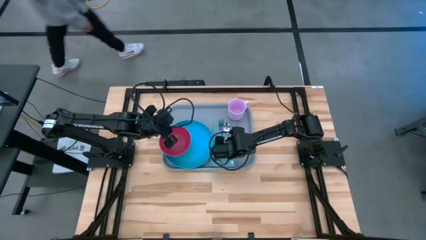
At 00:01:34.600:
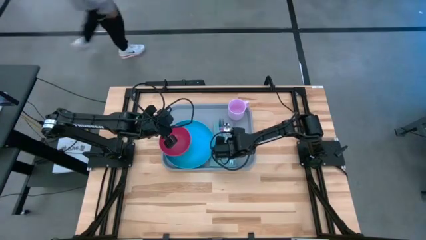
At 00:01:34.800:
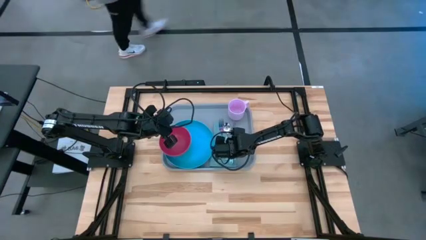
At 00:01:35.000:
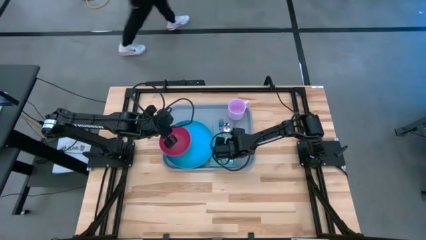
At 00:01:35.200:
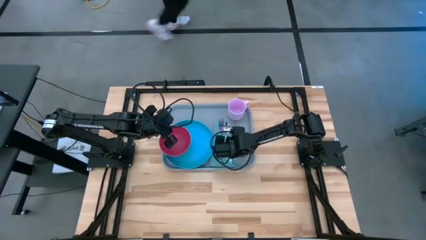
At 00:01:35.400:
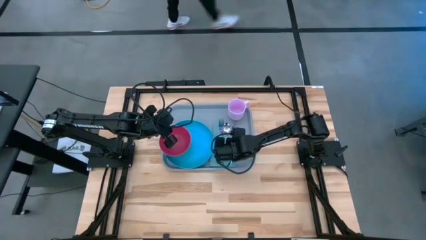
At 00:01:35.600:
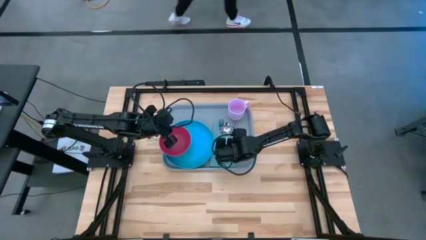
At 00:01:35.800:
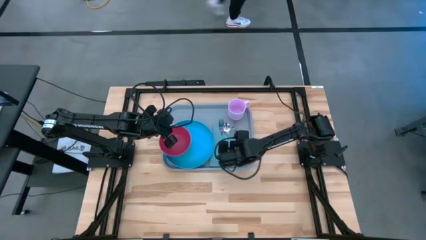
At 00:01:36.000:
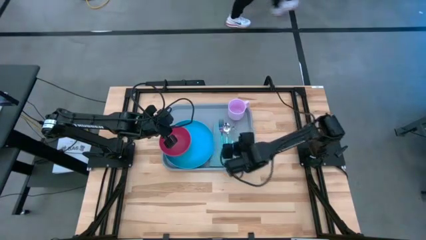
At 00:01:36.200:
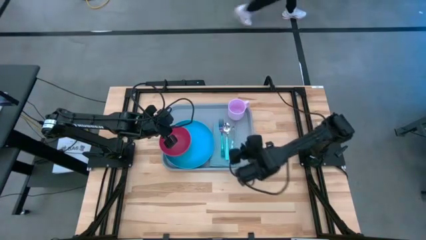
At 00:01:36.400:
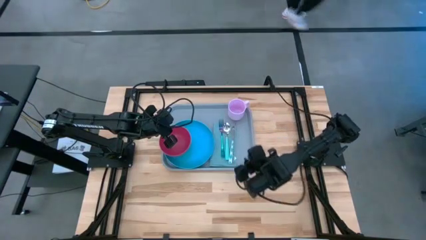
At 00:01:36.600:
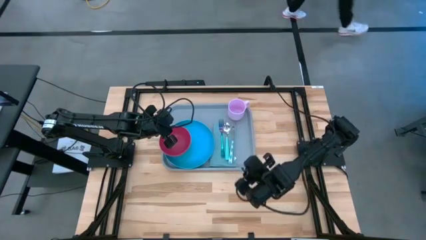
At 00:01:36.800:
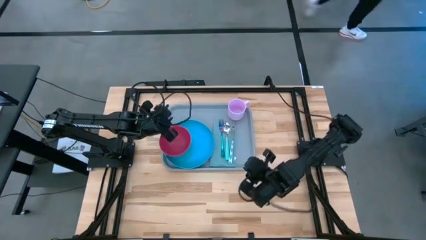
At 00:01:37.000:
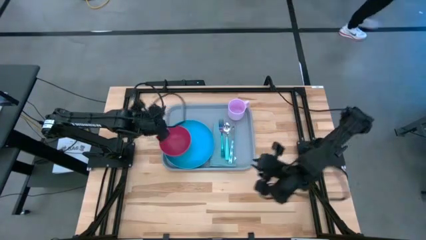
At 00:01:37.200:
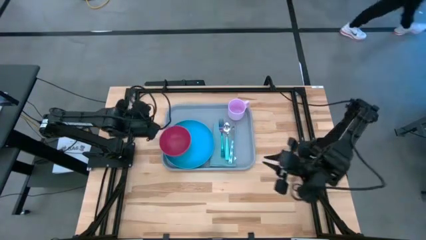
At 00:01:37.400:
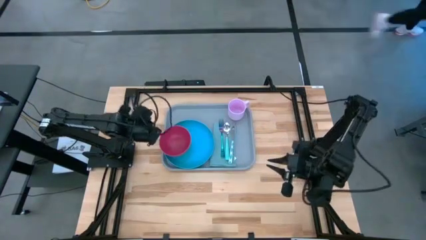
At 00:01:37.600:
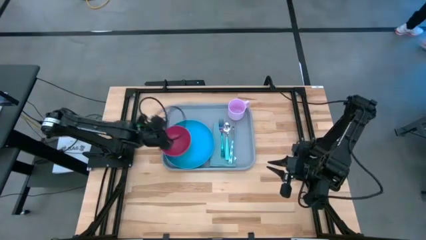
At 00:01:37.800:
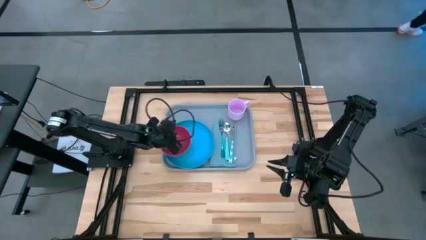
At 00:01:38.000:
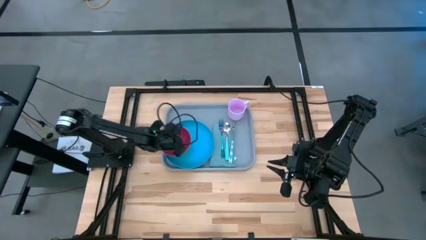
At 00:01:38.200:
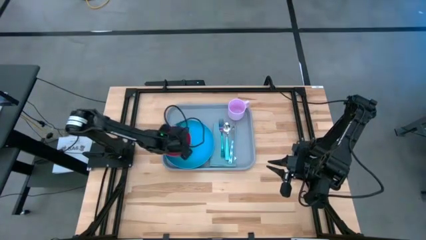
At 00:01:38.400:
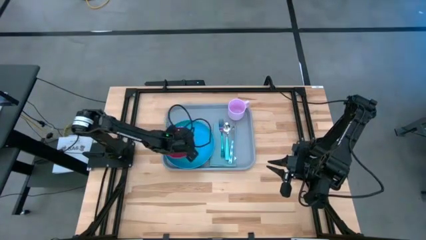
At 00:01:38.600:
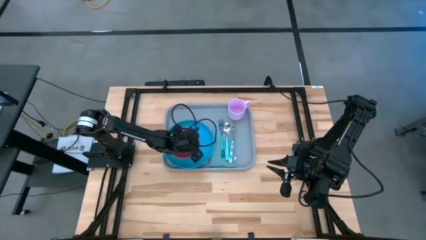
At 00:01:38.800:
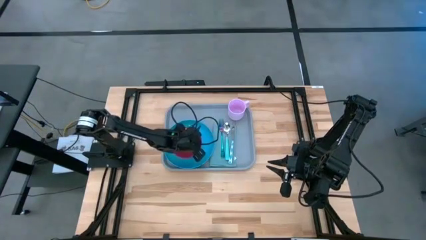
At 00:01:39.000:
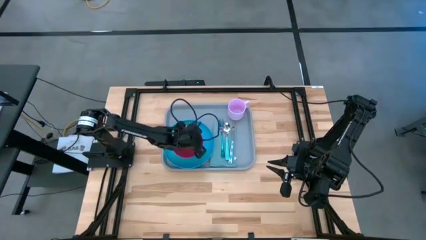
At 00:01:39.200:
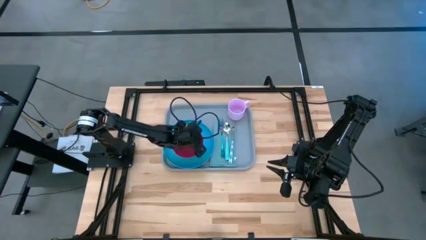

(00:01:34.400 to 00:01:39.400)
Task: Set up tray
Adjust the bowl

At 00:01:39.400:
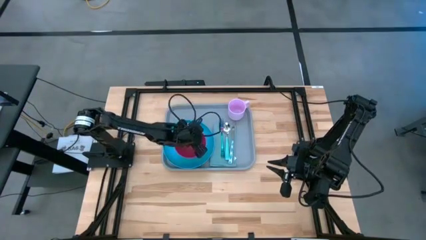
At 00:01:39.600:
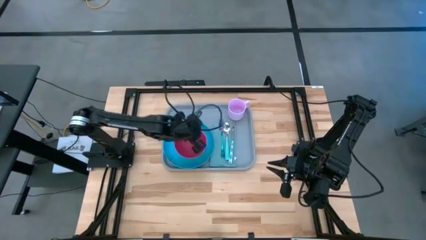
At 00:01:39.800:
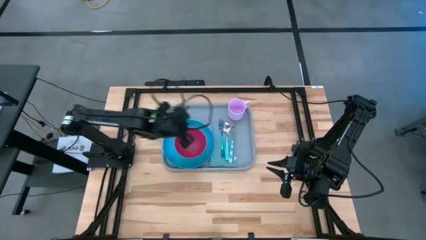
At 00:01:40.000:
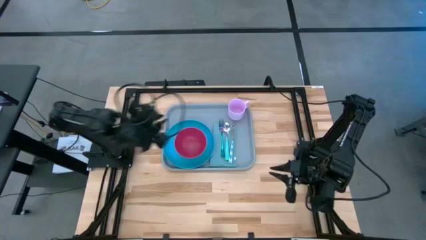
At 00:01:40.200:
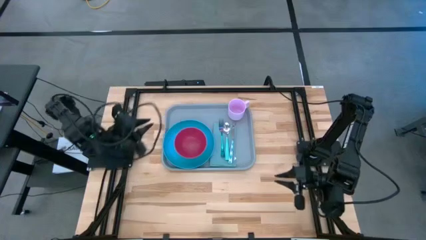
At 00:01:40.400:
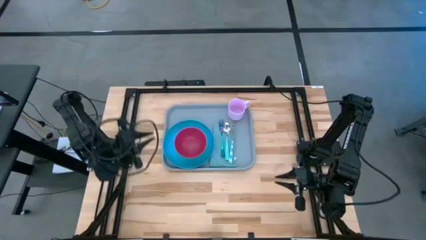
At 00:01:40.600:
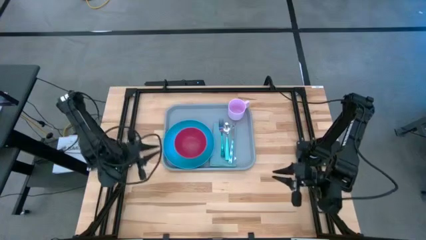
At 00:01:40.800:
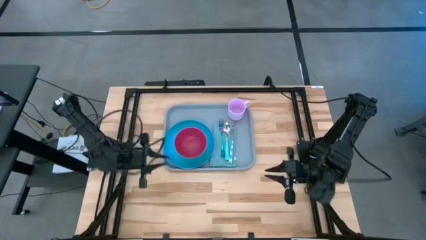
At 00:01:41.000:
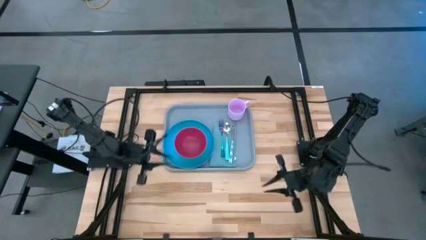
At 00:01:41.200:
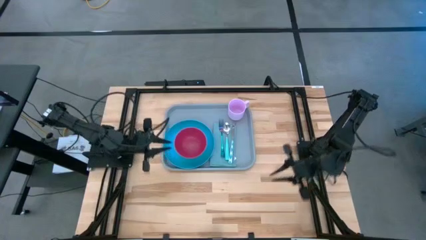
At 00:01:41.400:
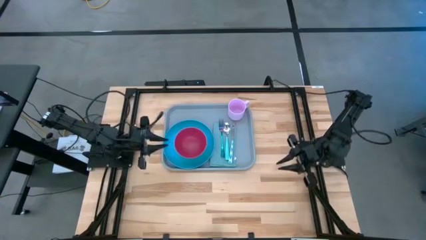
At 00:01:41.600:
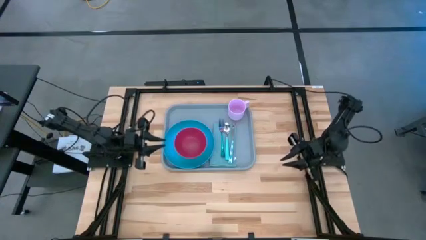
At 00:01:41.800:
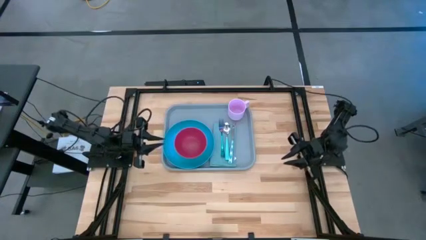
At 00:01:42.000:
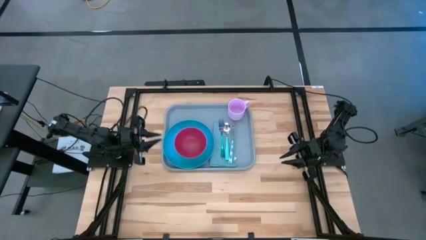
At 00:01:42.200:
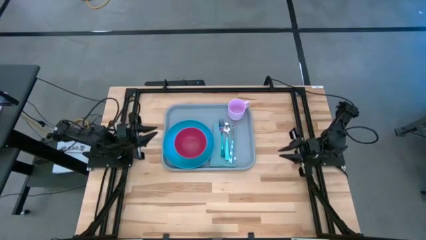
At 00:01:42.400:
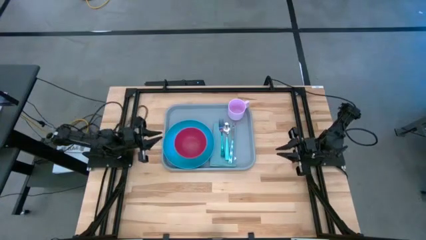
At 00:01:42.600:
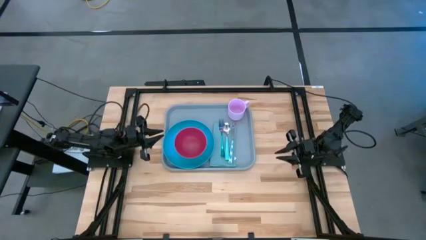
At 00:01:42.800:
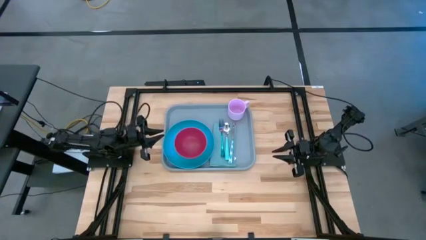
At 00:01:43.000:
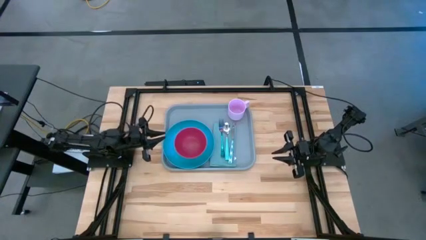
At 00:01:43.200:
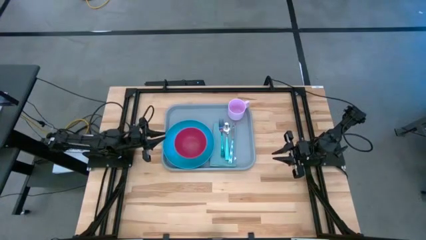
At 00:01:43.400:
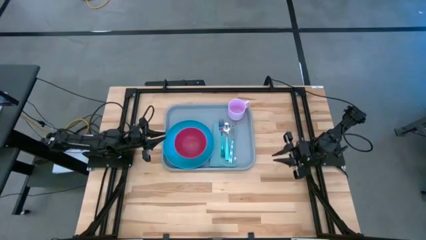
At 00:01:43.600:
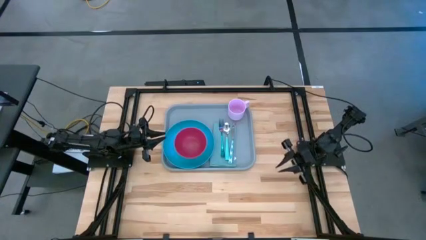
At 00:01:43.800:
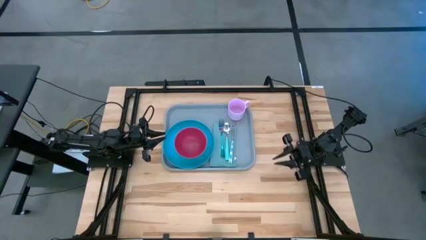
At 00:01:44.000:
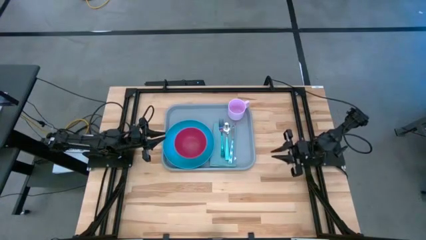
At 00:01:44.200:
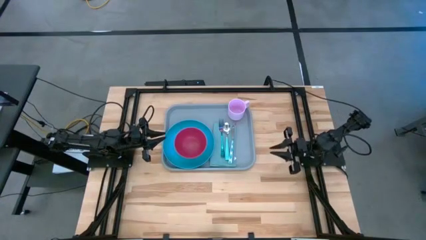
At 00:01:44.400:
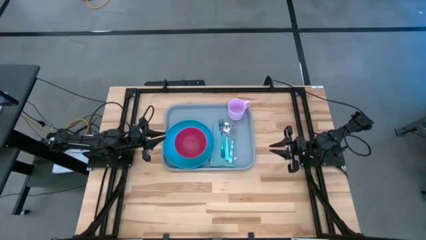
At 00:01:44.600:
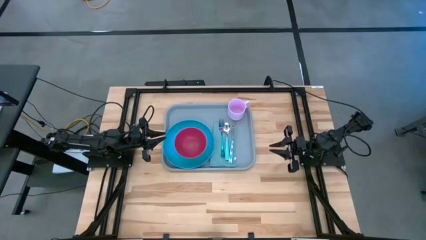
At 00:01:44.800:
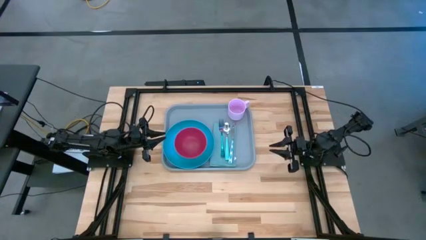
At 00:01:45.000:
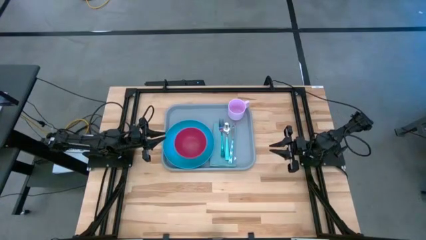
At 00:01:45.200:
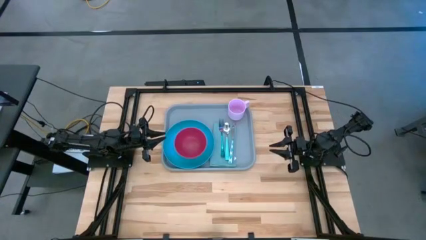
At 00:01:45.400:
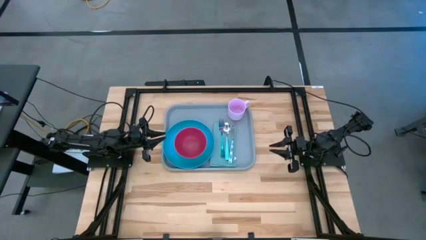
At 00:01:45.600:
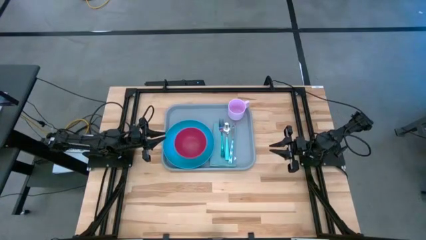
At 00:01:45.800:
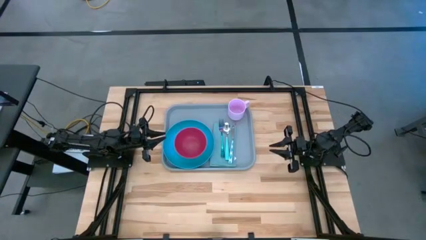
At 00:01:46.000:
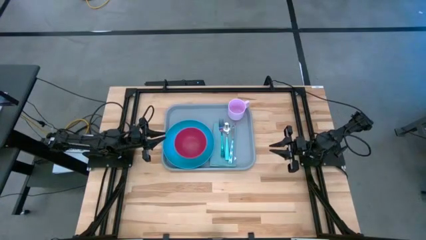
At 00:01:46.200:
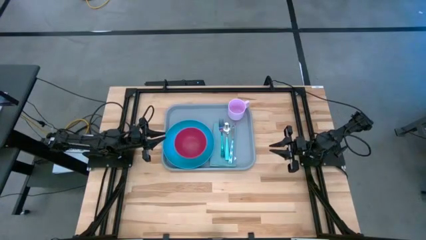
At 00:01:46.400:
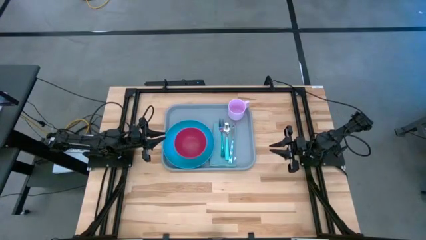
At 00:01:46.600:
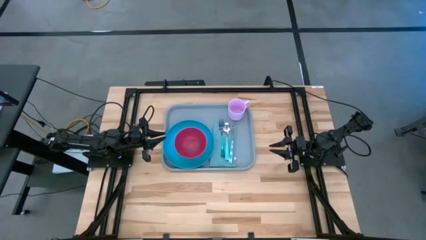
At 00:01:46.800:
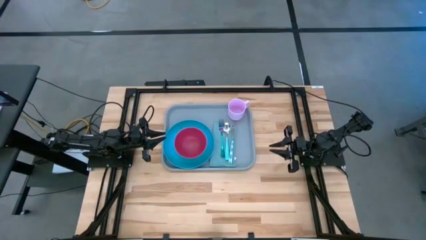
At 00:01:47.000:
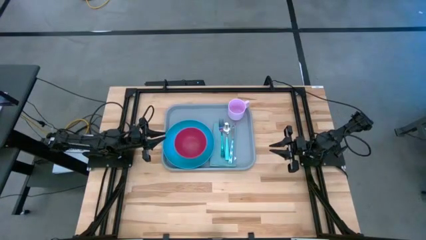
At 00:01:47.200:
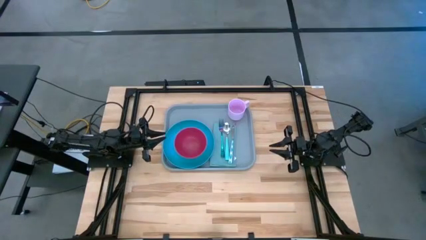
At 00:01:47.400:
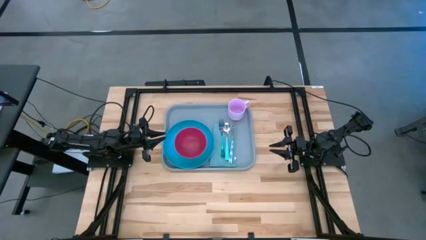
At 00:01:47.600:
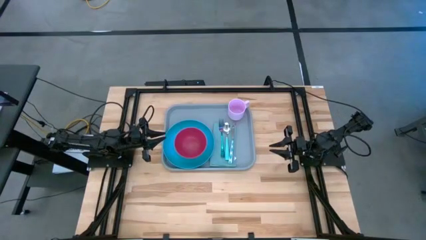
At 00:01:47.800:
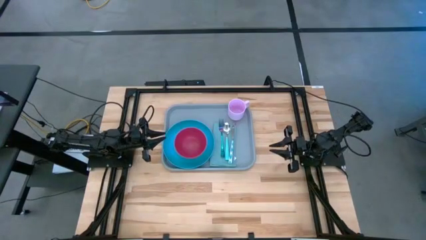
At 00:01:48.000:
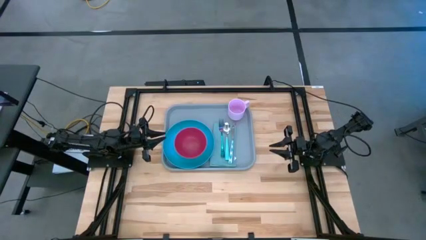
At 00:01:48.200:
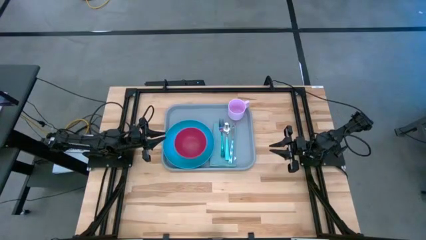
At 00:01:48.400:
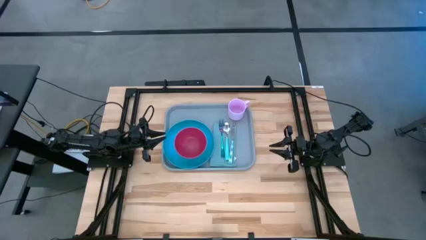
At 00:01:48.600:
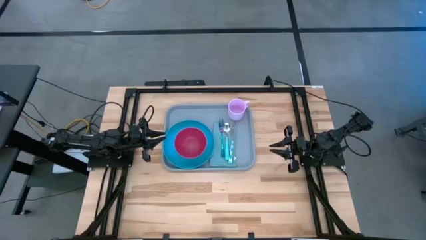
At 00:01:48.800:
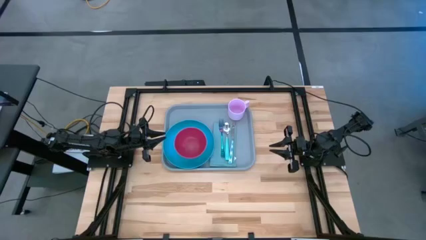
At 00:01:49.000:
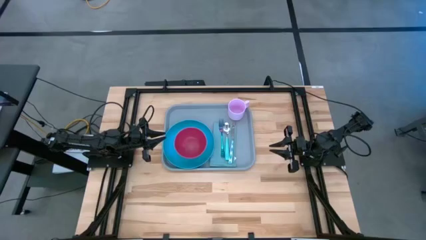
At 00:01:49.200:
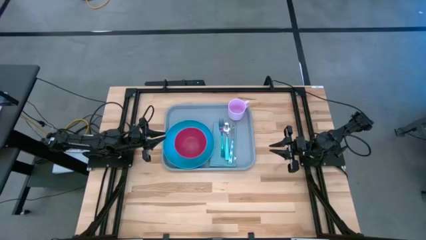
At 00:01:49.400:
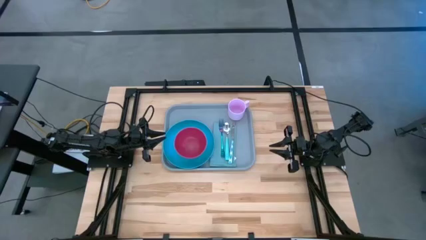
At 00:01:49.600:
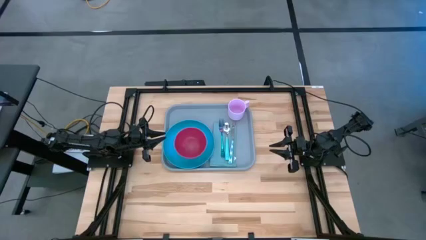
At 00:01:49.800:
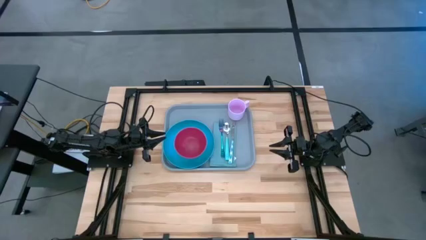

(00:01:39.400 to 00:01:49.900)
Return to Home Position
